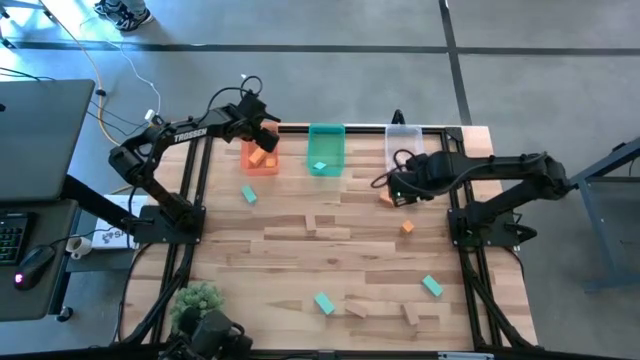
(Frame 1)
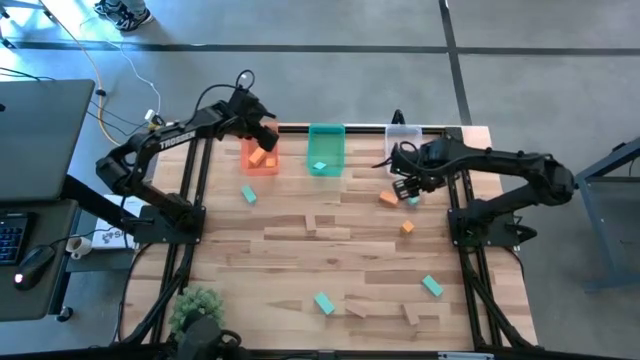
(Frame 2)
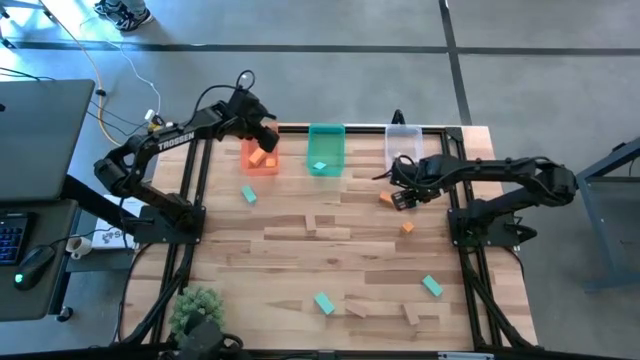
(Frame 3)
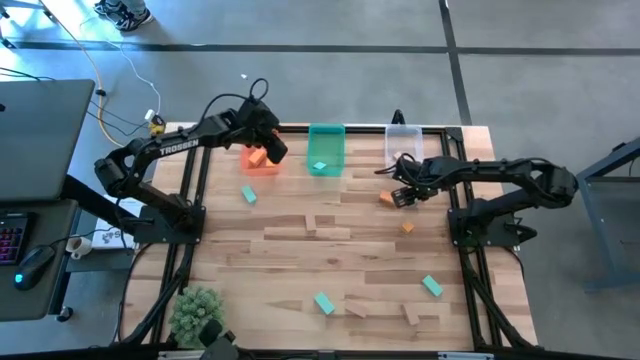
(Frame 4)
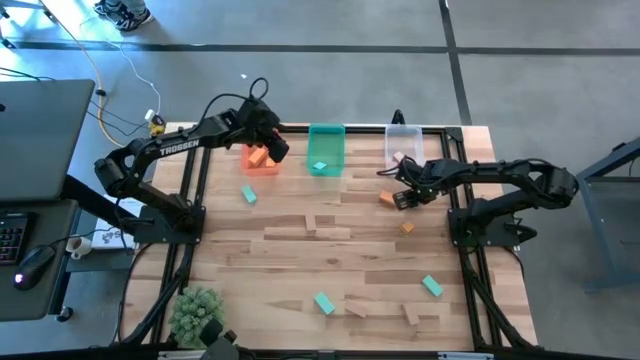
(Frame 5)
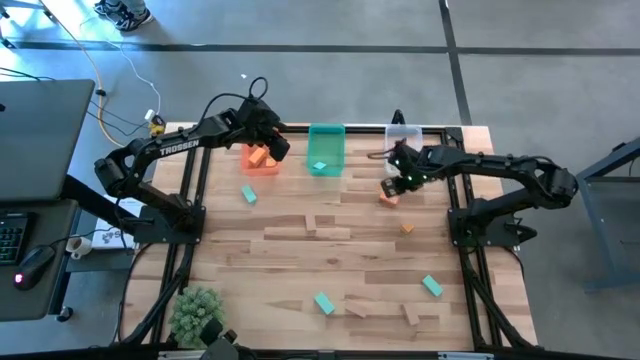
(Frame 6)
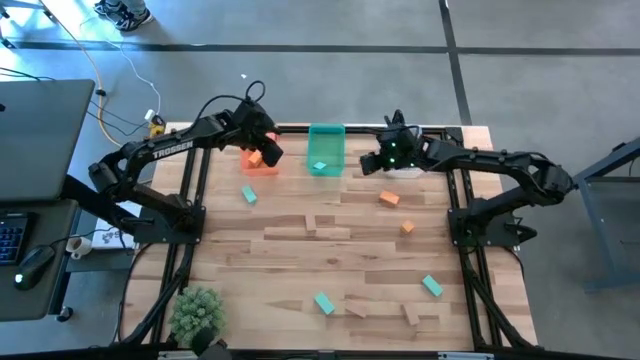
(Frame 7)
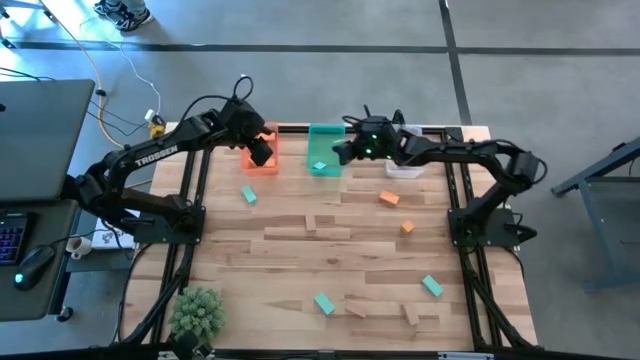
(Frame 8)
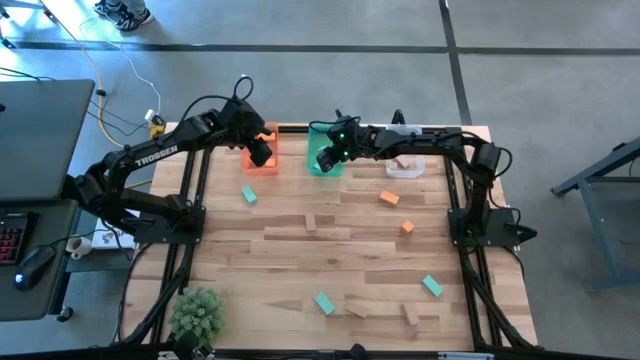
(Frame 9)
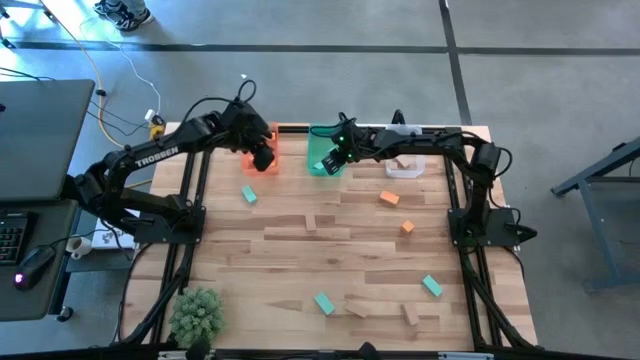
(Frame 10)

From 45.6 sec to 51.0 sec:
Task: Sort & place blocks by color
Put the blue block into the green bin

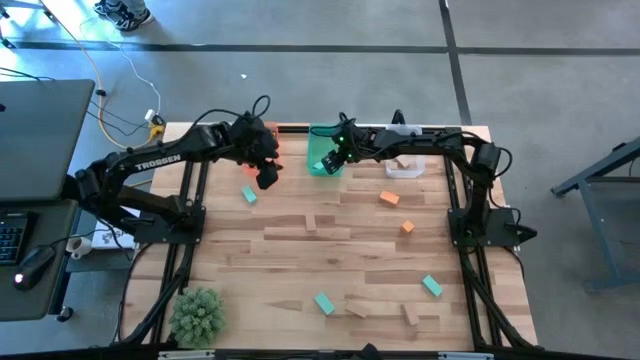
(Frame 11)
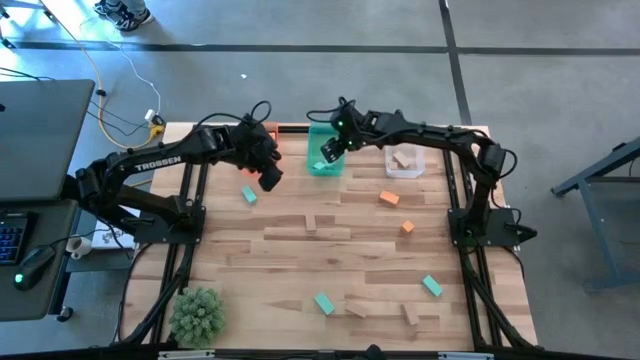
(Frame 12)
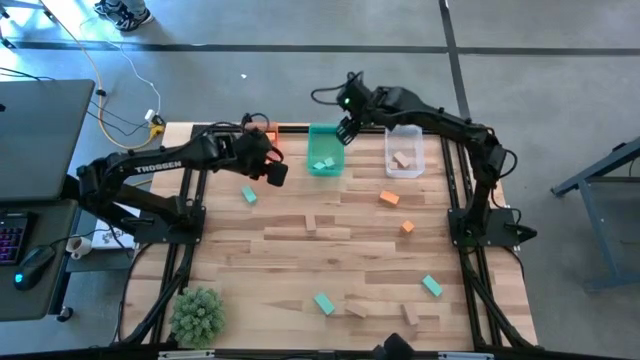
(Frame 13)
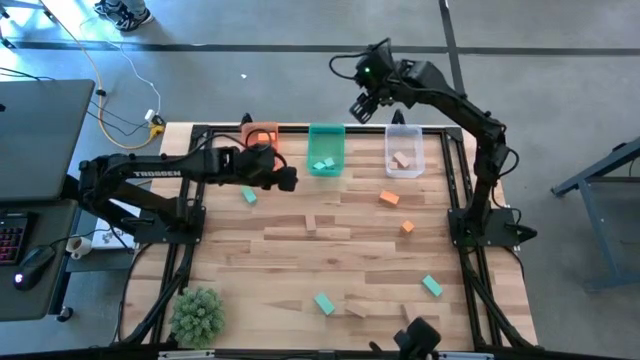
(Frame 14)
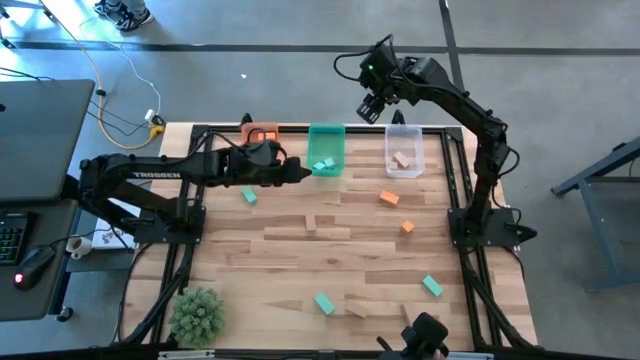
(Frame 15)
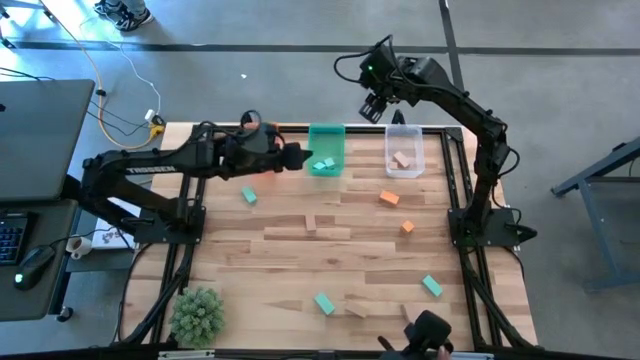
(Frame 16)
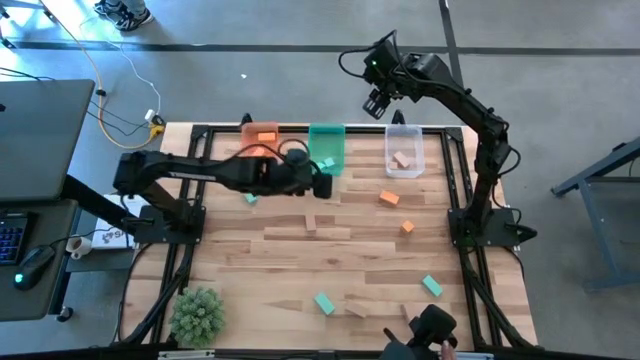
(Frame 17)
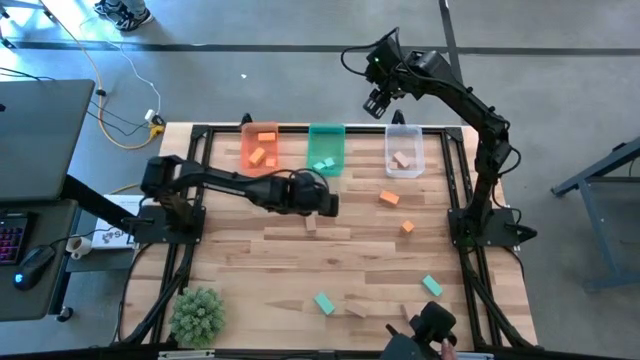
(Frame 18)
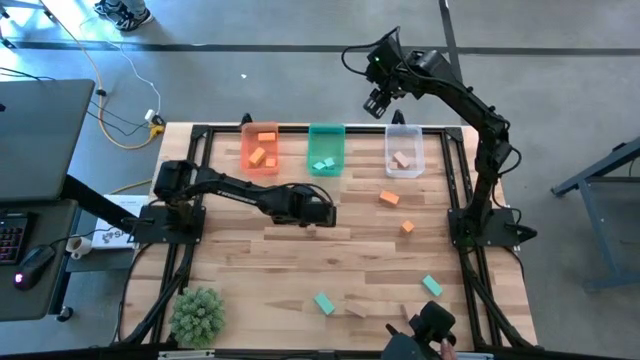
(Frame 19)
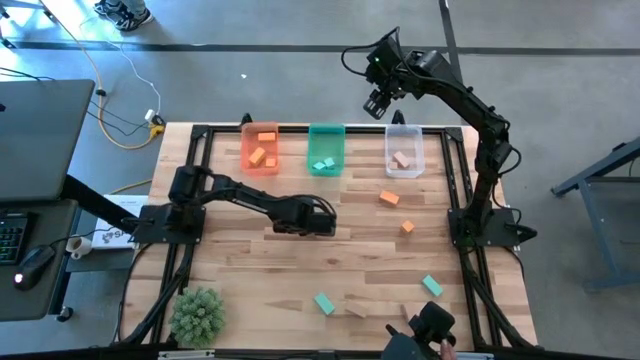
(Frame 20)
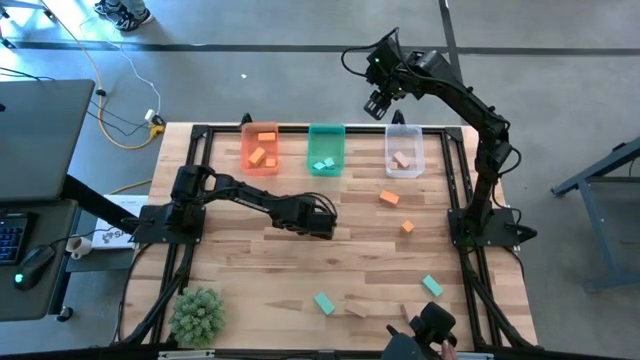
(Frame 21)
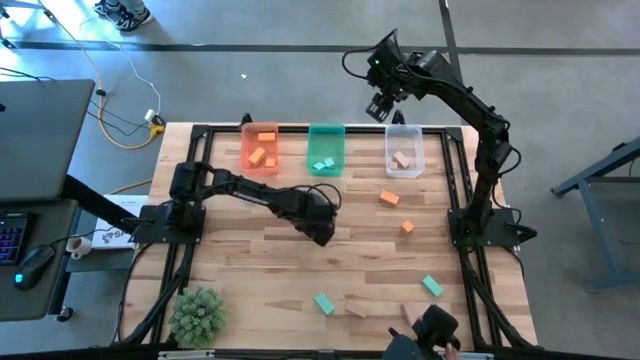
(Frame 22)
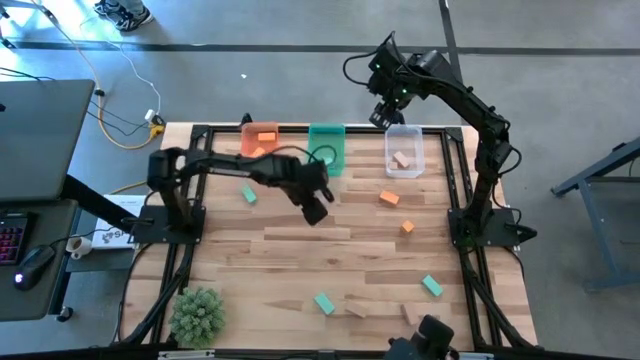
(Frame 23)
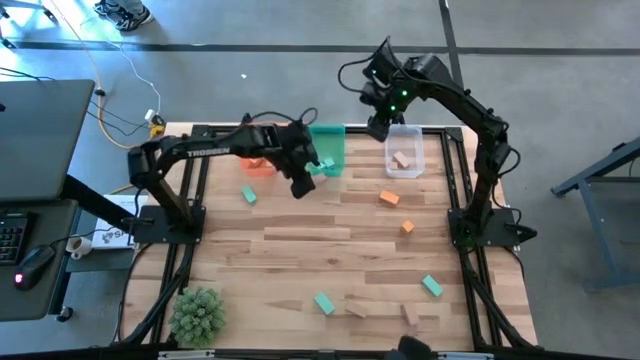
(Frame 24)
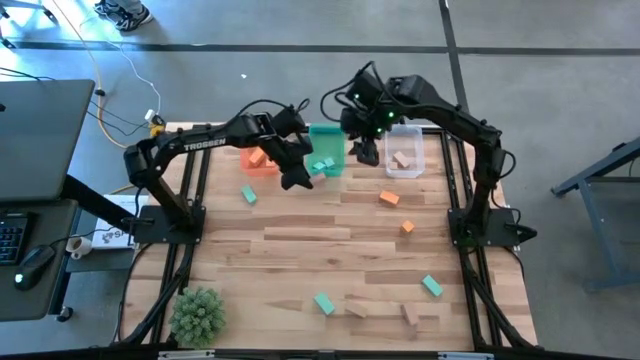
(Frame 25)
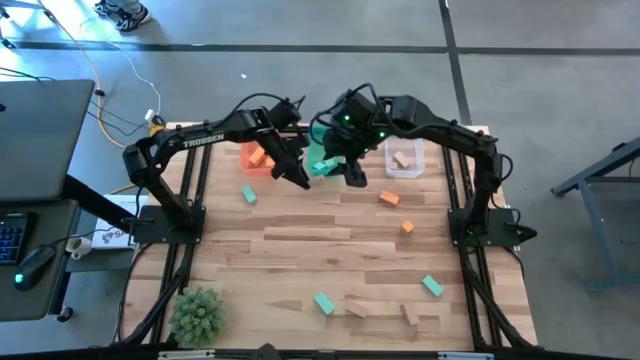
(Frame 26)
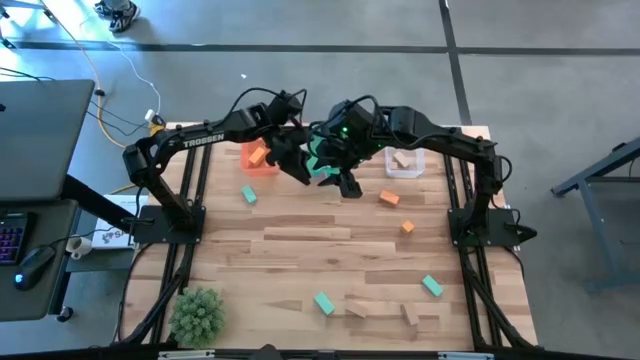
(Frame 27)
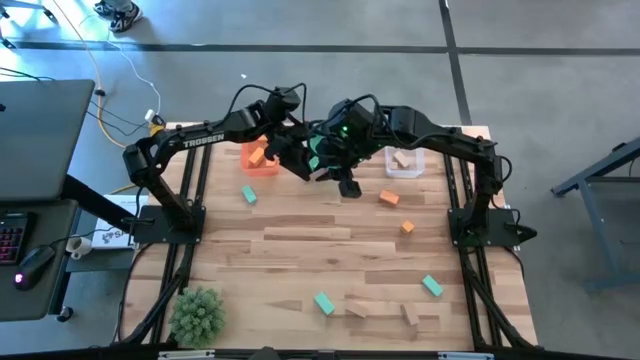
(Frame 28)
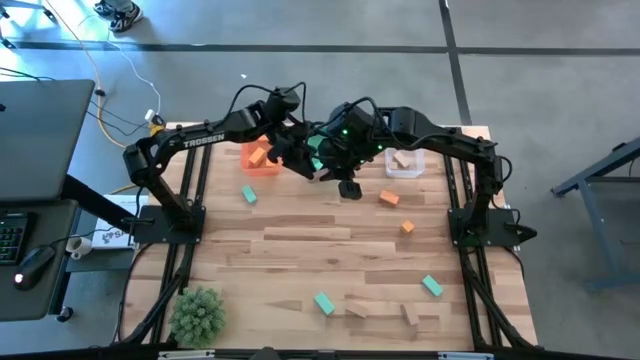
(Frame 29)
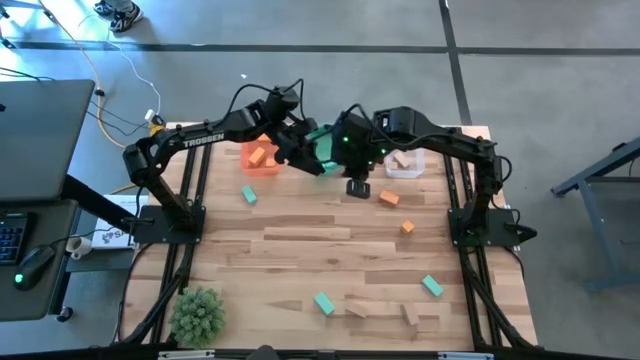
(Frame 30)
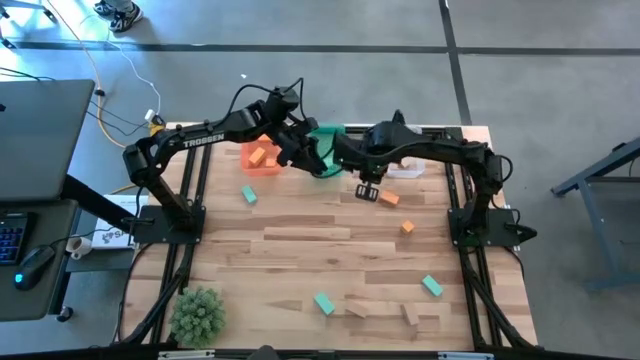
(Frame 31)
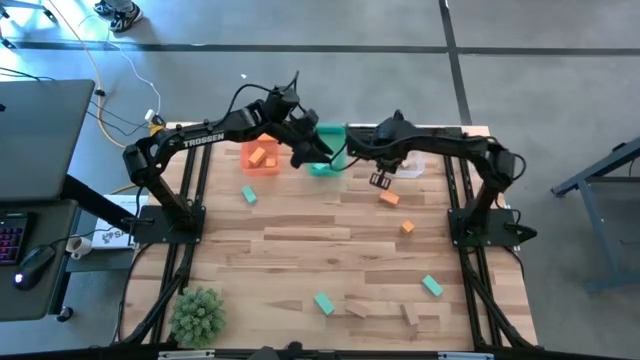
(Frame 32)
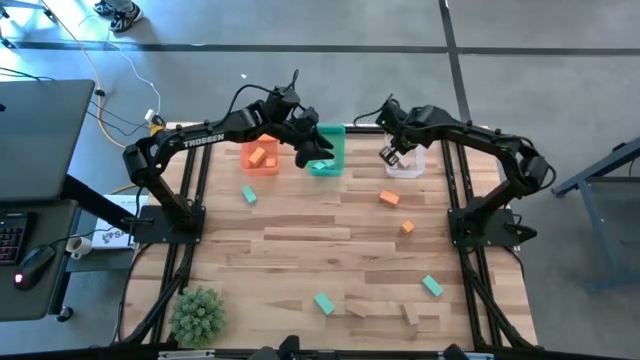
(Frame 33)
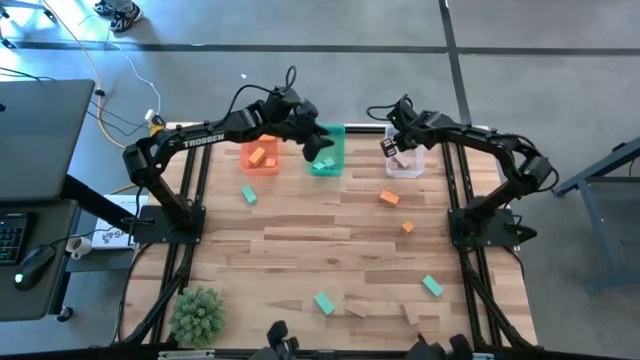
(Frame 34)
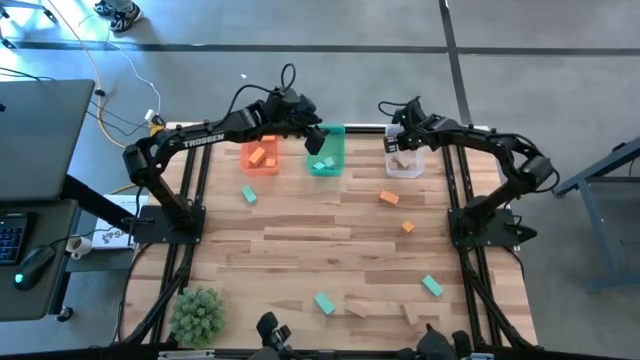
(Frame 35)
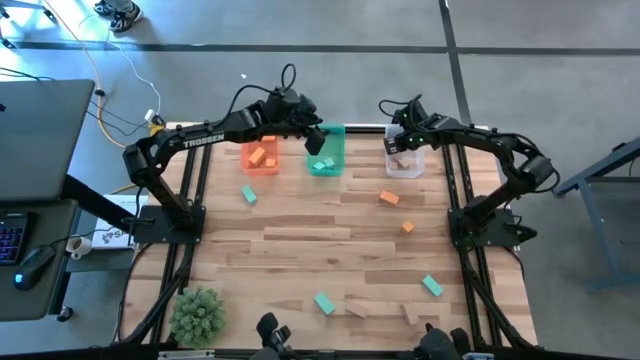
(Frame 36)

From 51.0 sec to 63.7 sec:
Put the brown block into the white bin

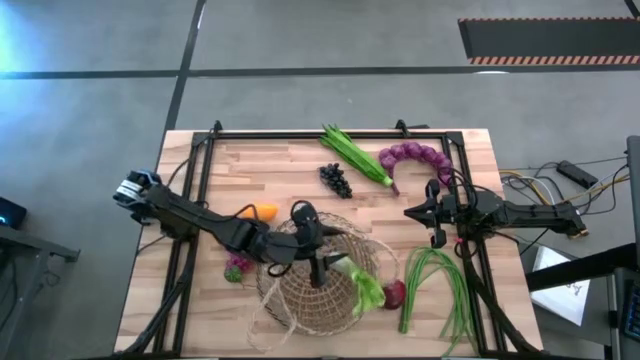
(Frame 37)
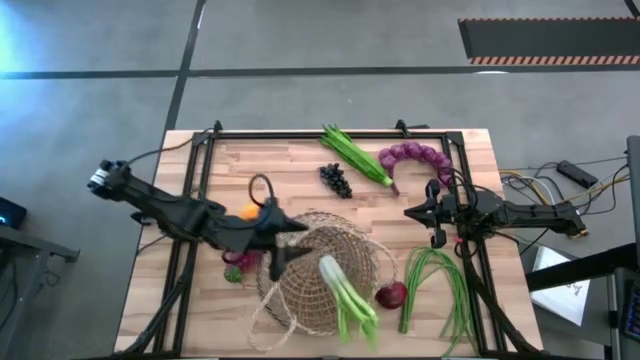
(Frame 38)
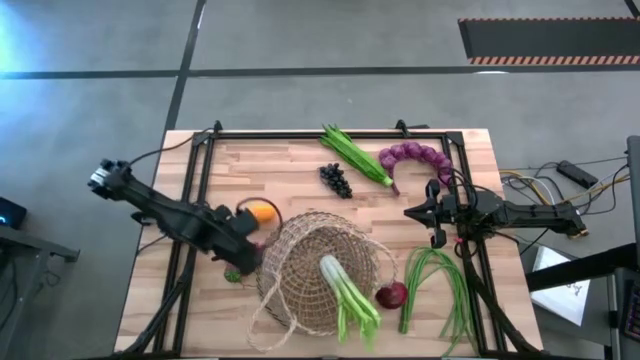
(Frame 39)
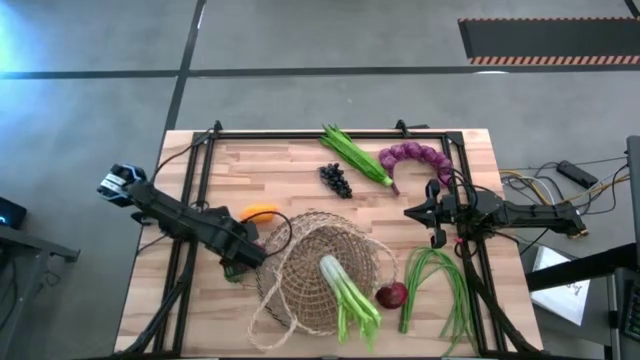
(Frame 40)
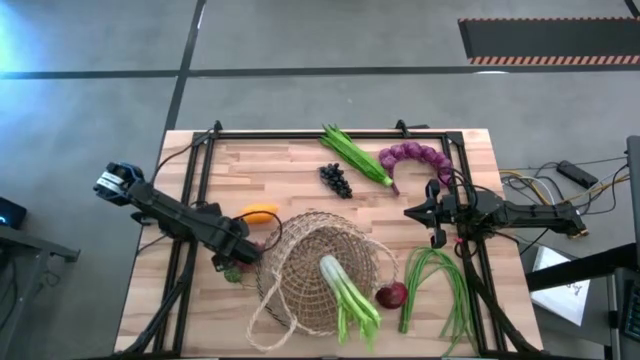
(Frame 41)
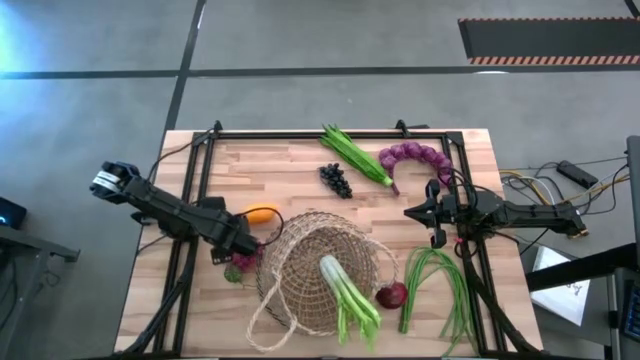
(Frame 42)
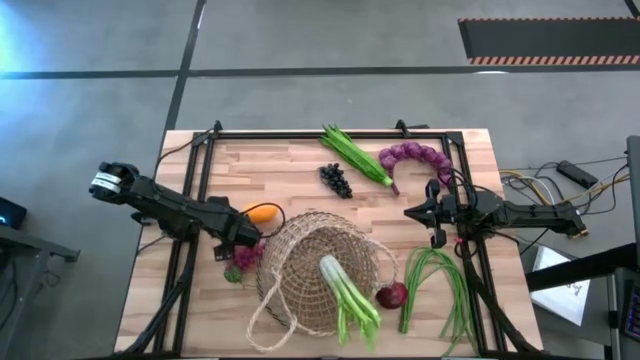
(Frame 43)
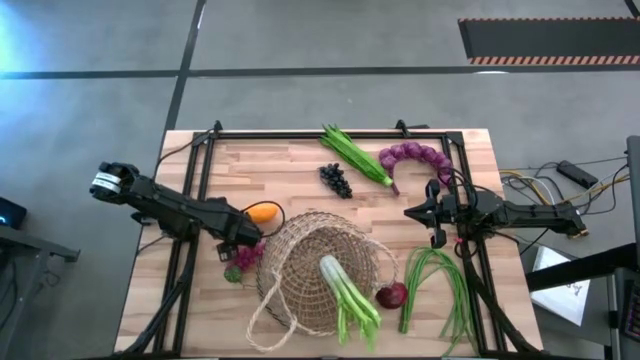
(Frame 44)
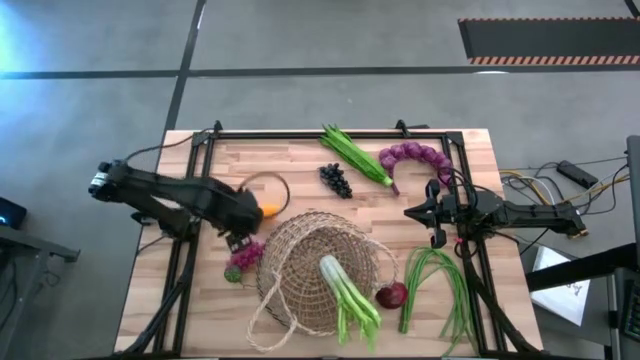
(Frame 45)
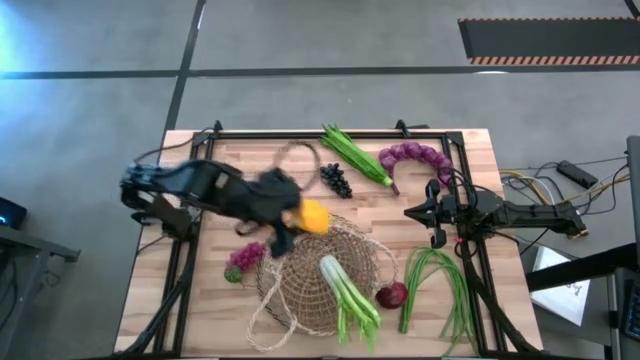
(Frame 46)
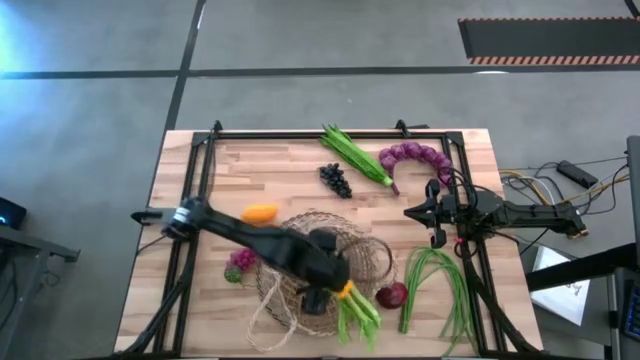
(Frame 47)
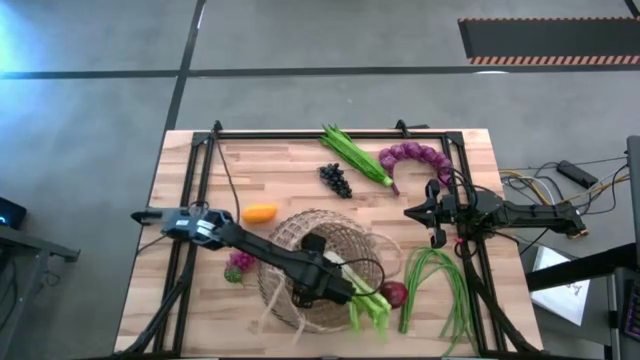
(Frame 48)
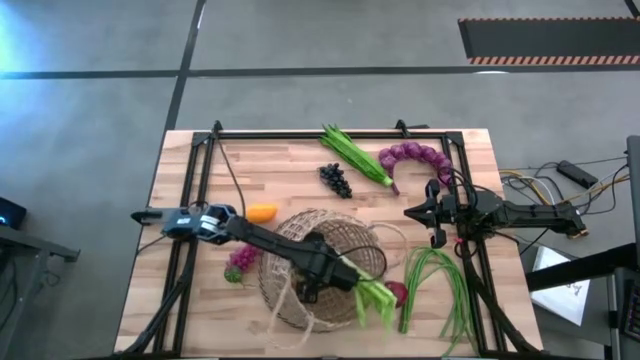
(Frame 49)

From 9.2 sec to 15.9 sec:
Task: Build produce basket
Put the yellow bell pepper into the basket
